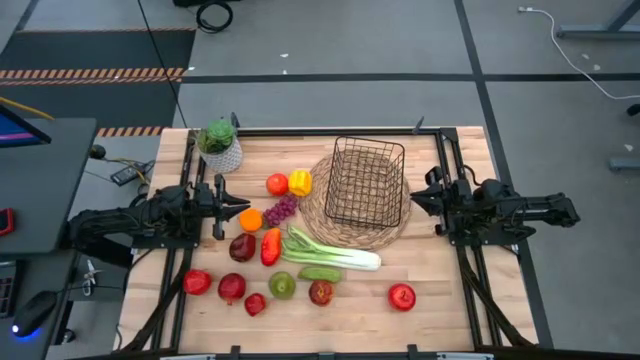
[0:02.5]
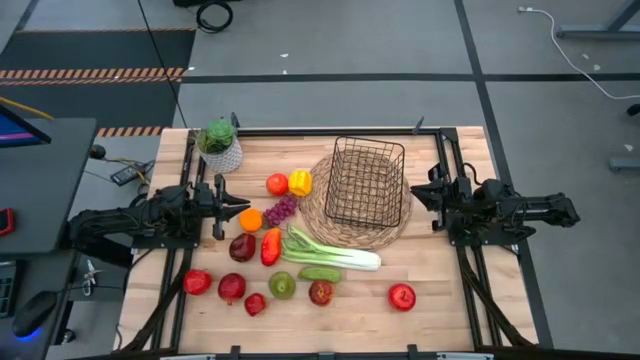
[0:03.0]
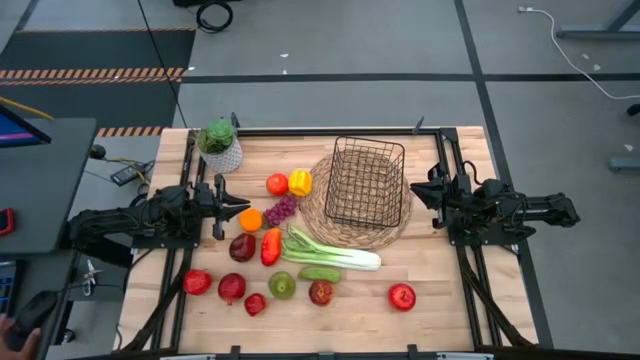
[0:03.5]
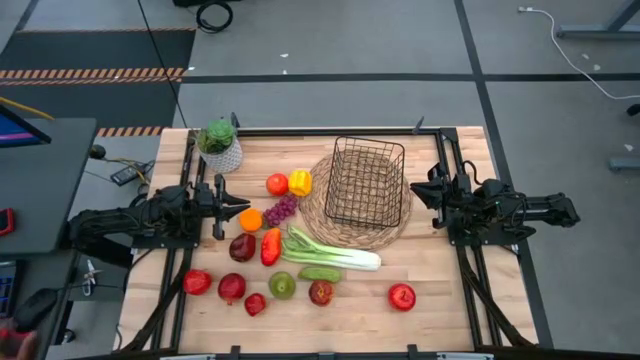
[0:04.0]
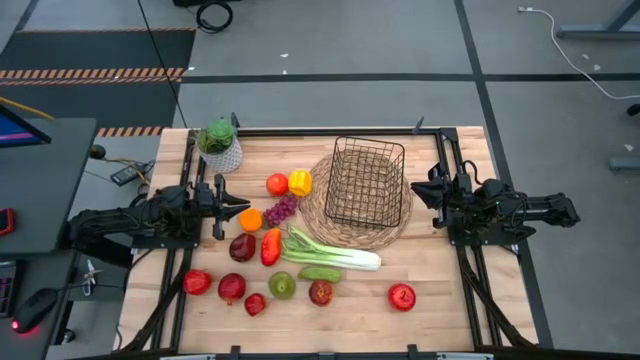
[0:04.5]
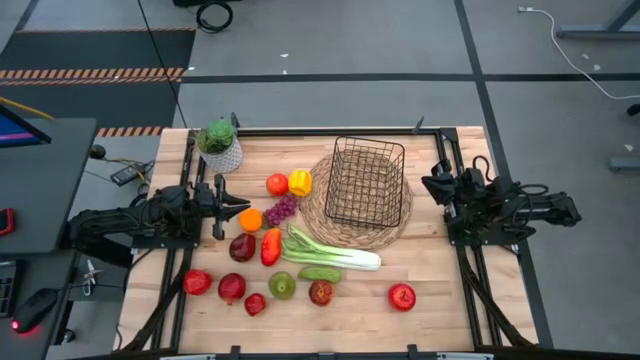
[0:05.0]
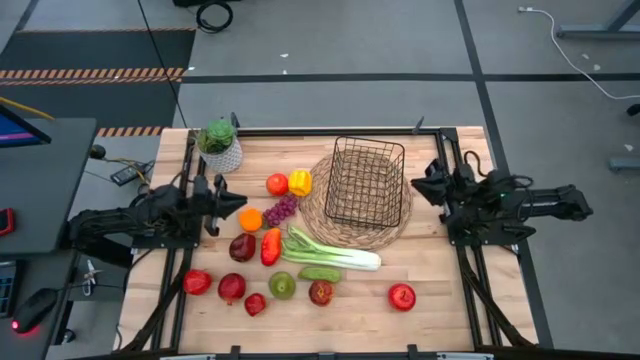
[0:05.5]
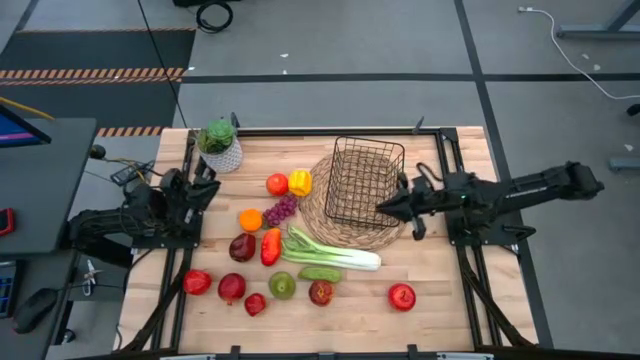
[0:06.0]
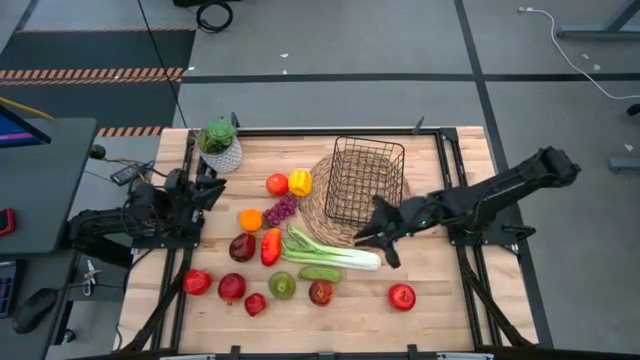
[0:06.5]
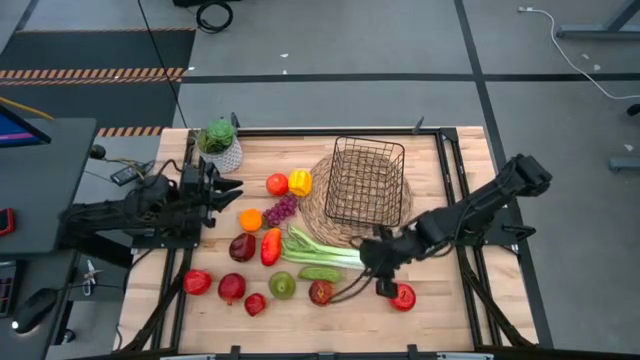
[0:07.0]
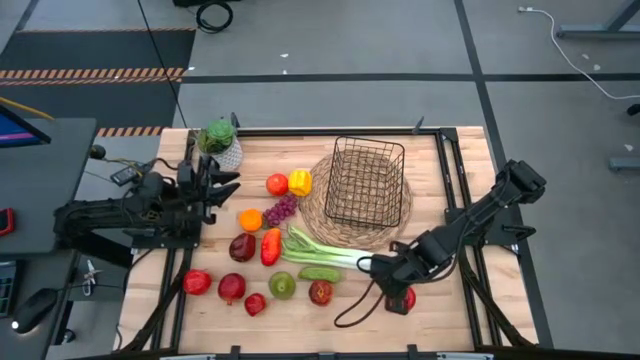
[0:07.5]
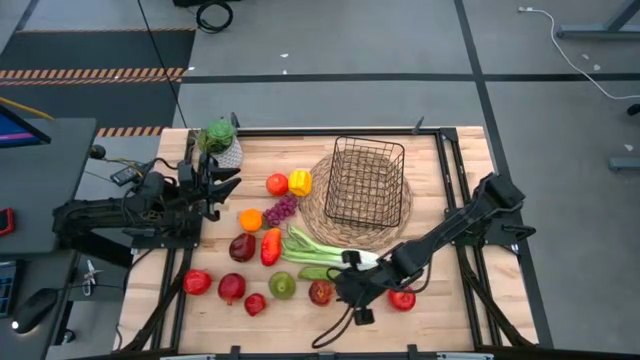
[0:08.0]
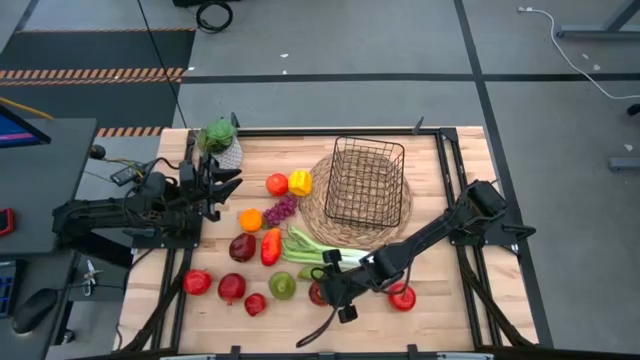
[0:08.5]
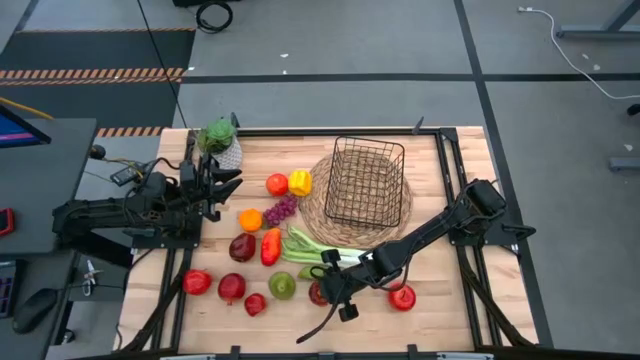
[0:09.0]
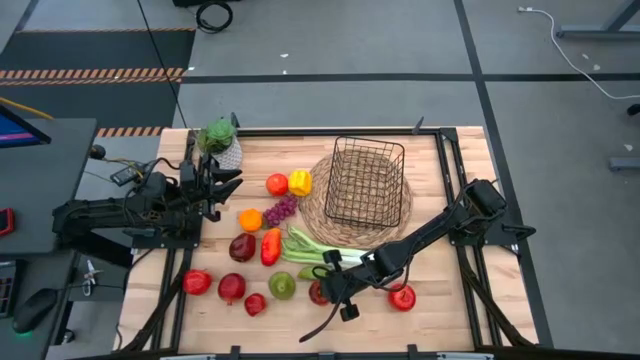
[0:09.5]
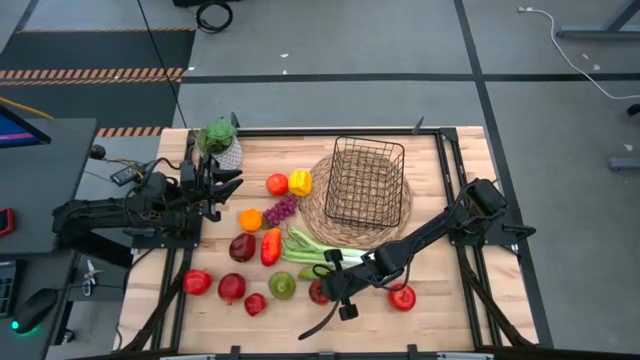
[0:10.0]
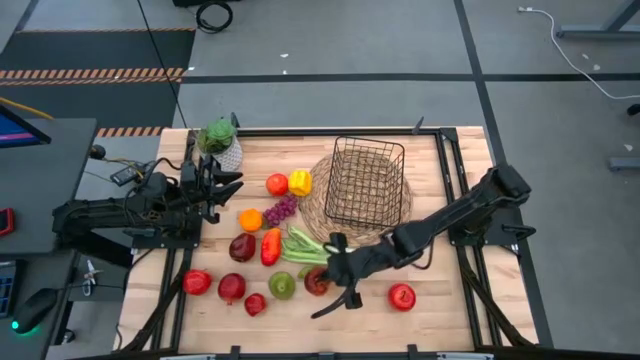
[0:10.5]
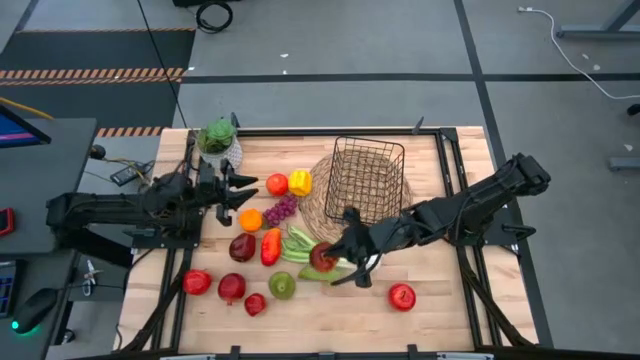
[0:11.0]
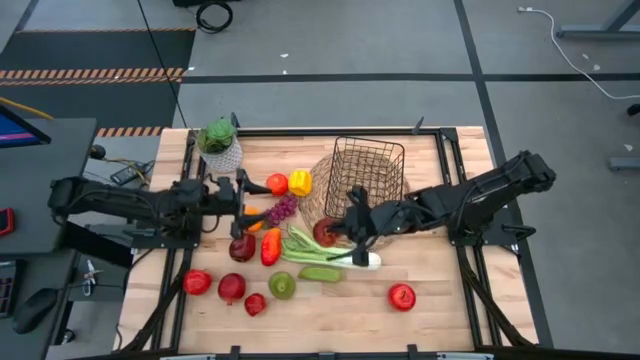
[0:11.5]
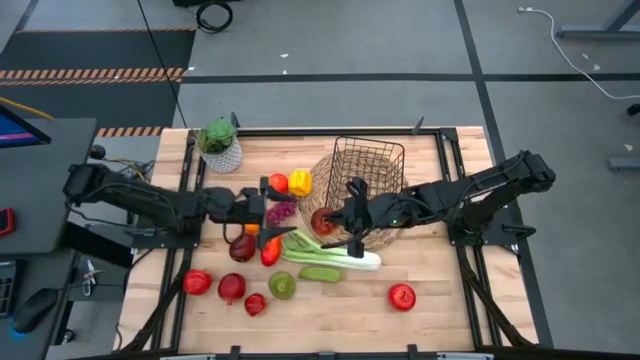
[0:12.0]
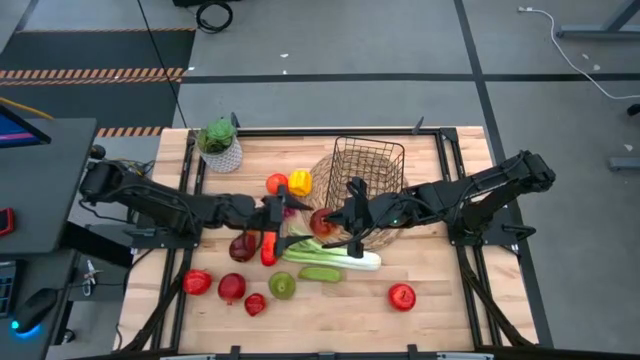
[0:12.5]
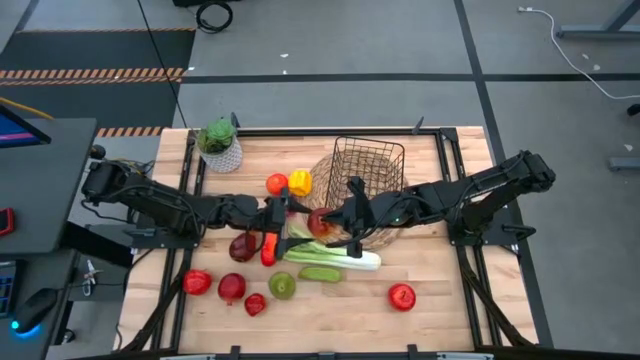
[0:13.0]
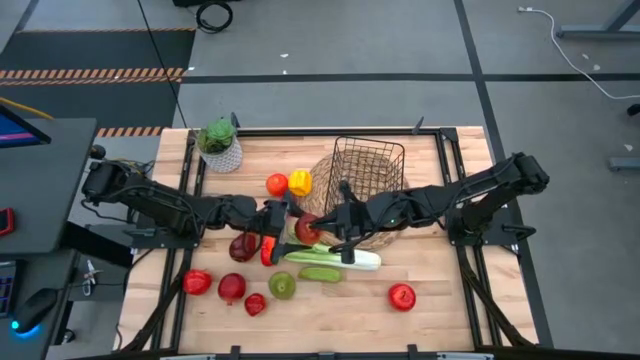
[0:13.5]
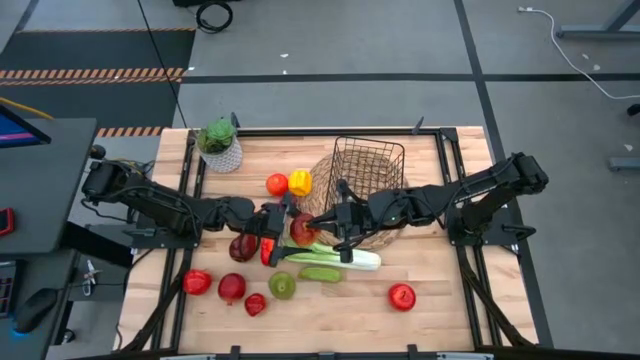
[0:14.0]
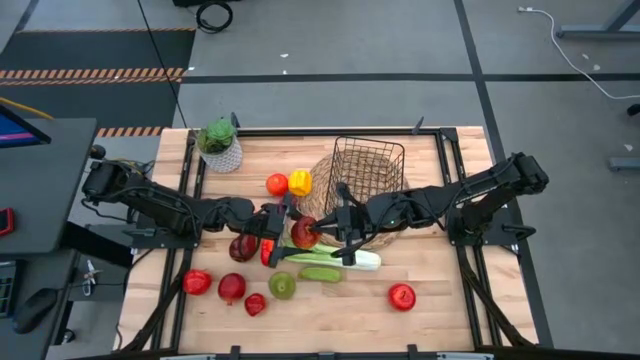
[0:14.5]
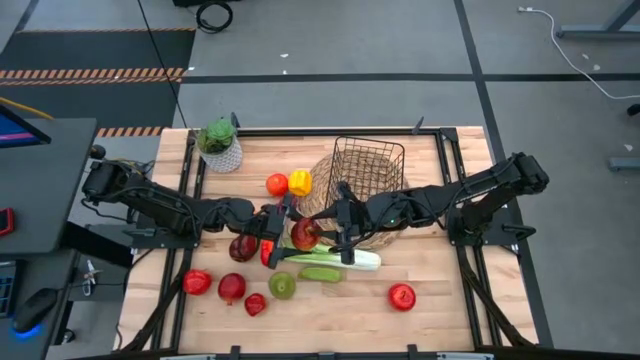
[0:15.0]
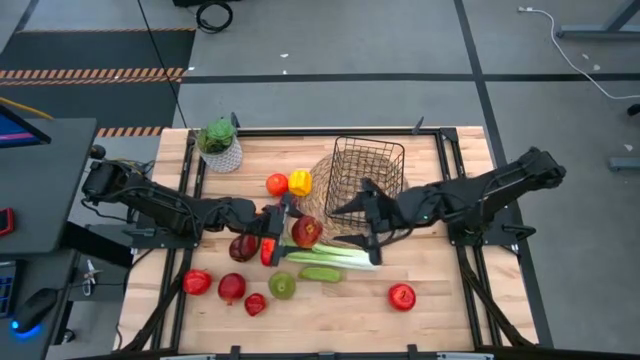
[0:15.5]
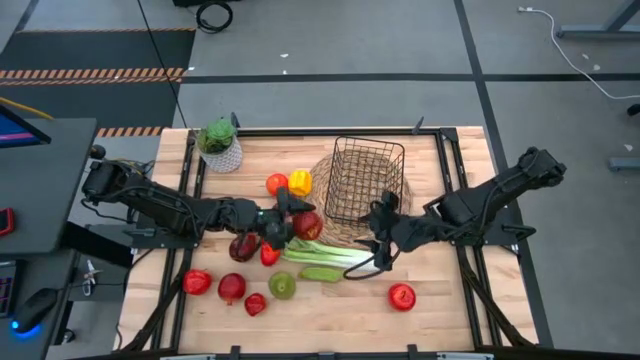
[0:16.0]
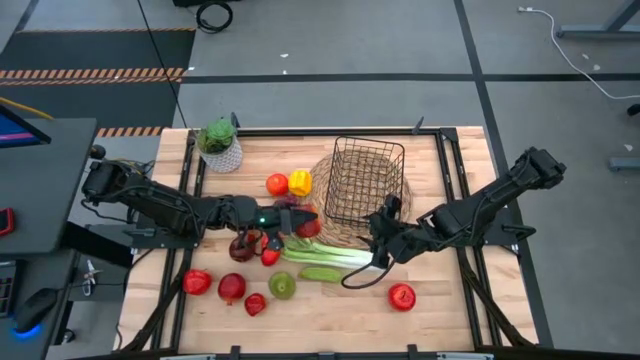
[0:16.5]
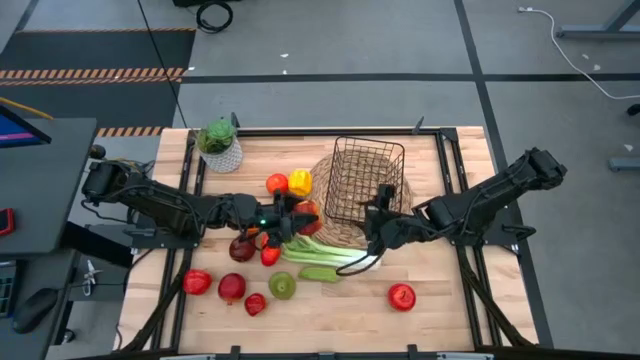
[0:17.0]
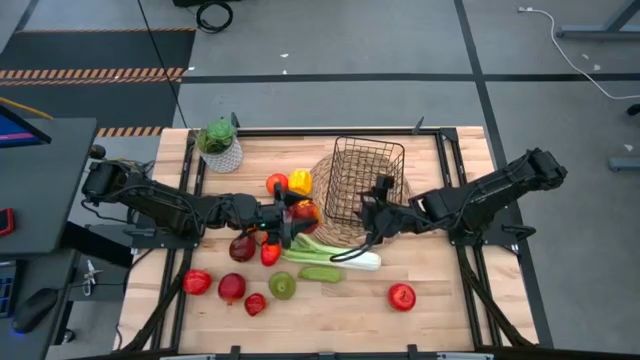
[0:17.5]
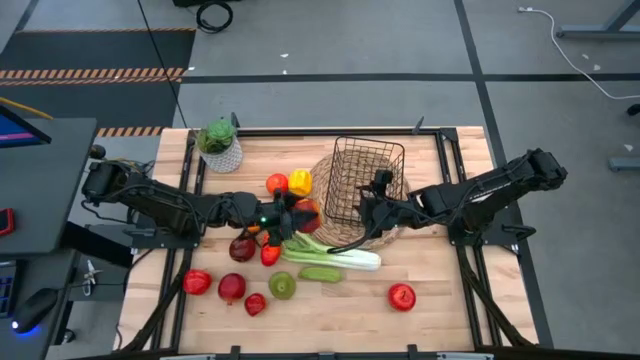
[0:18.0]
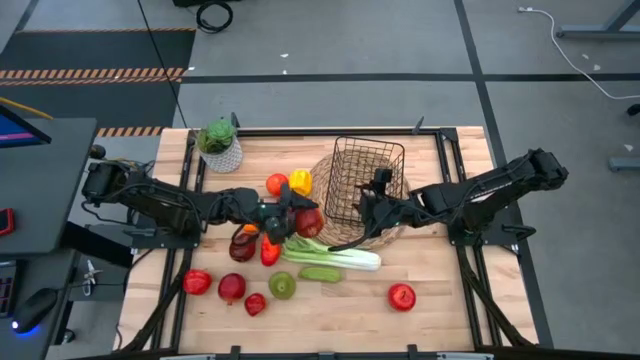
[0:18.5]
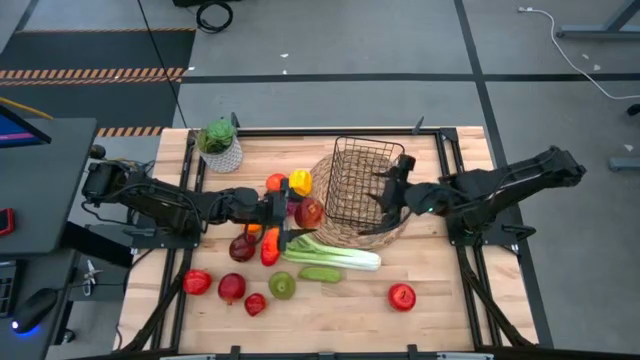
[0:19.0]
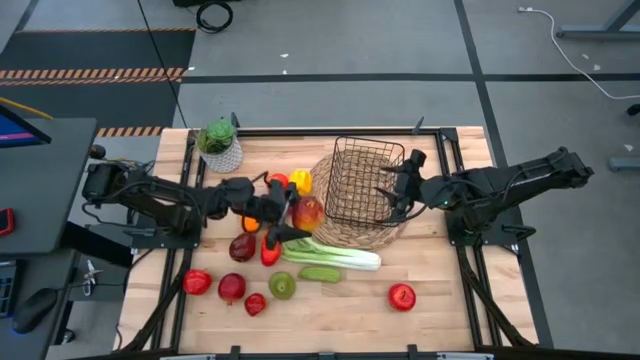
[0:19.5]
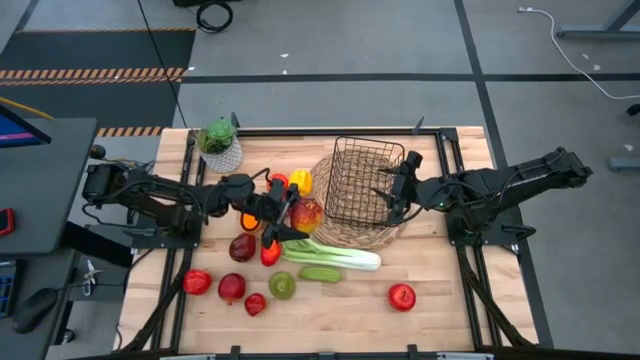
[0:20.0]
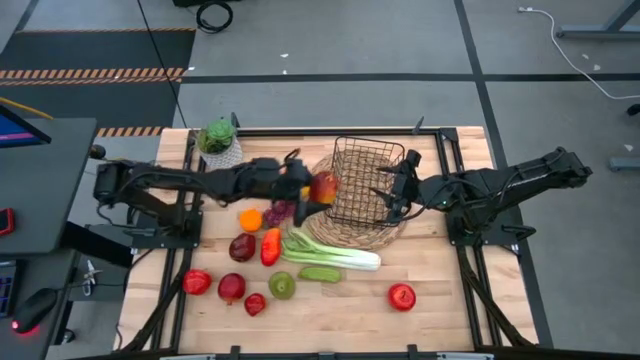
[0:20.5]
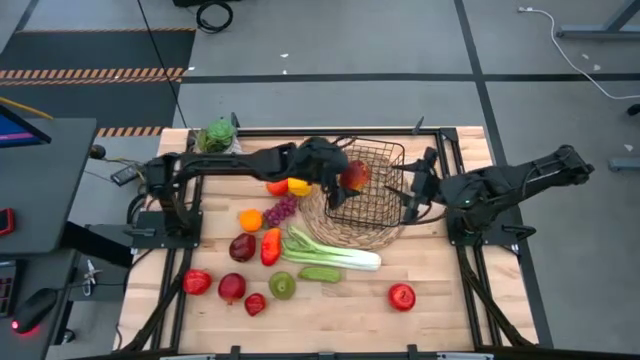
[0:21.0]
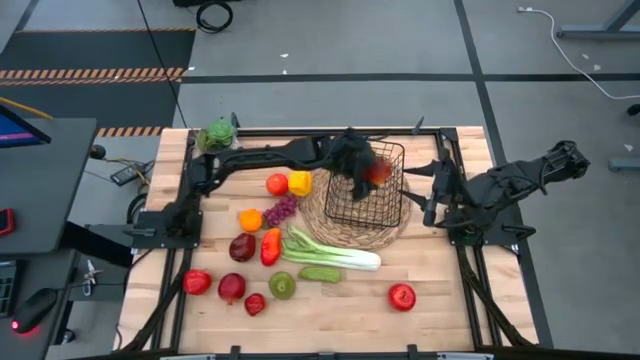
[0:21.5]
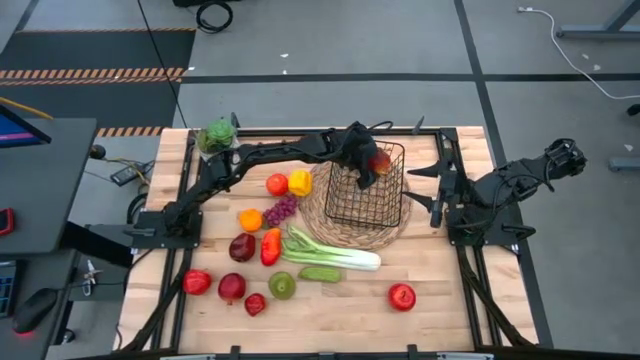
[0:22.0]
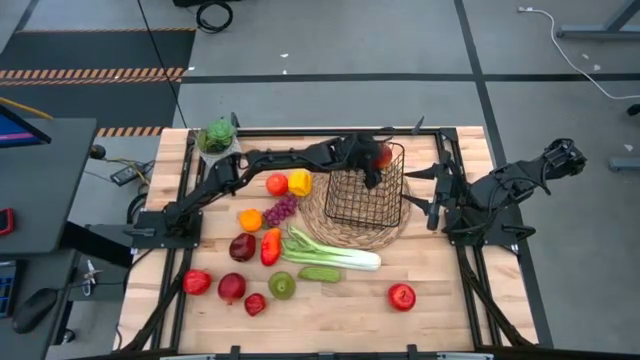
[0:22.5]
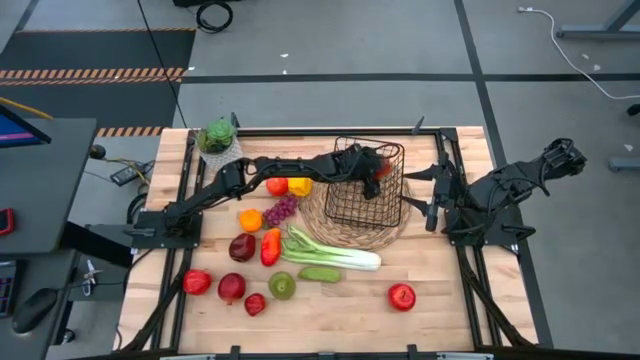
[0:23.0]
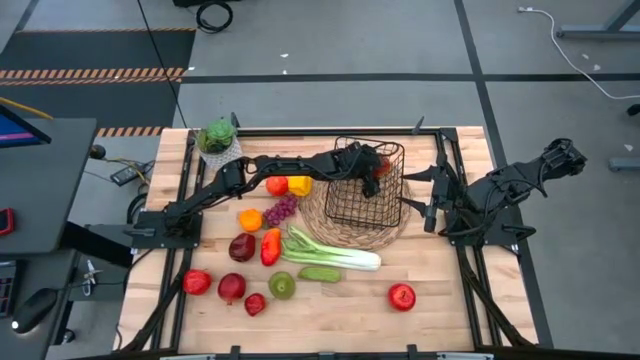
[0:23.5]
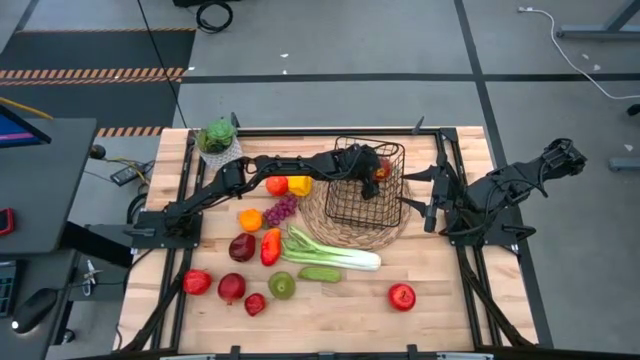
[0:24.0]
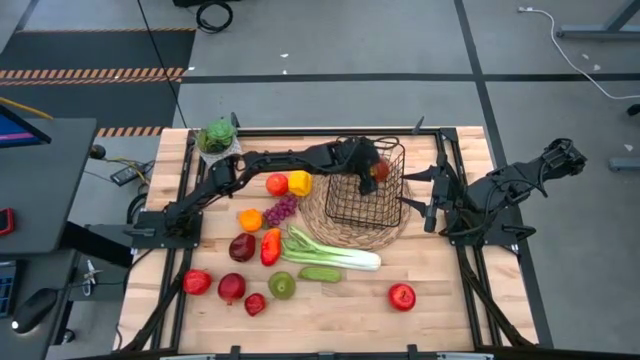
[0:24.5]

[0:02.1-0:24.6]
Task: Build produce basket
Put the apple into the wire basket
